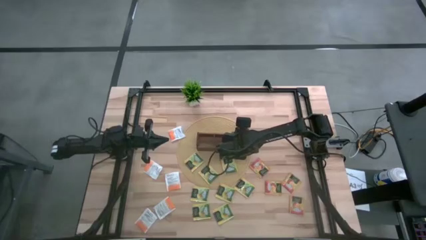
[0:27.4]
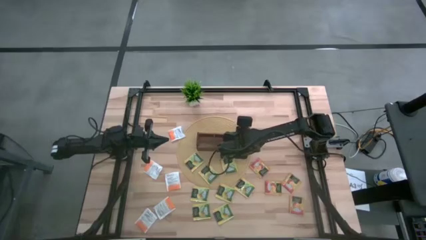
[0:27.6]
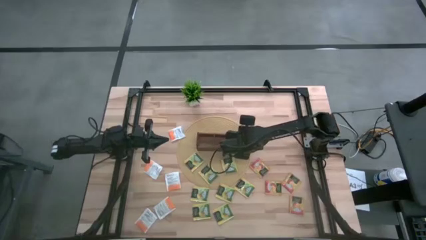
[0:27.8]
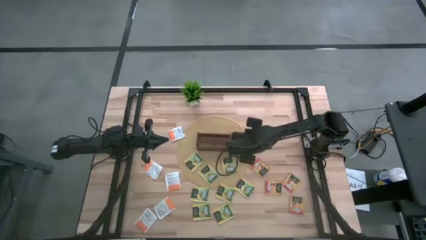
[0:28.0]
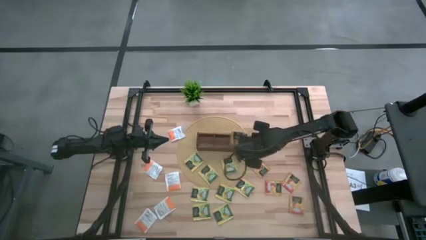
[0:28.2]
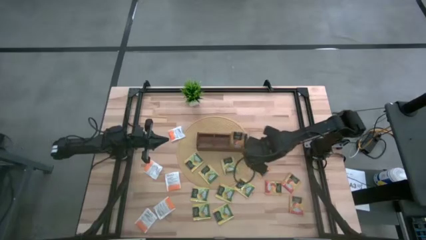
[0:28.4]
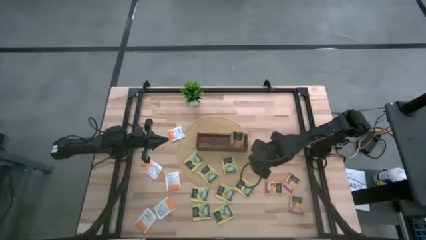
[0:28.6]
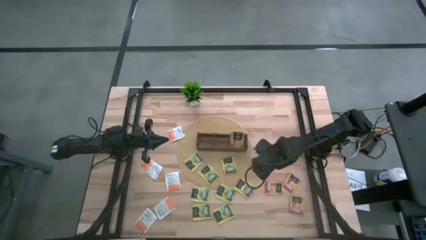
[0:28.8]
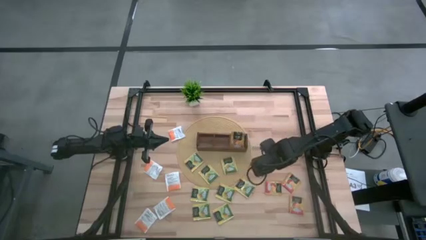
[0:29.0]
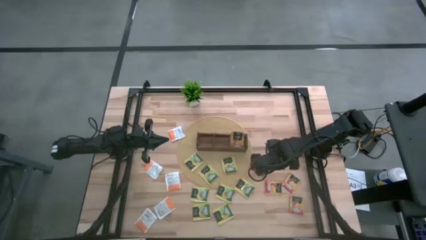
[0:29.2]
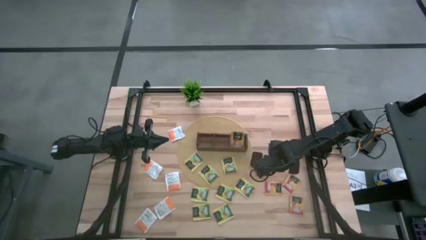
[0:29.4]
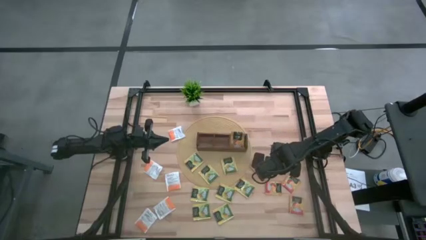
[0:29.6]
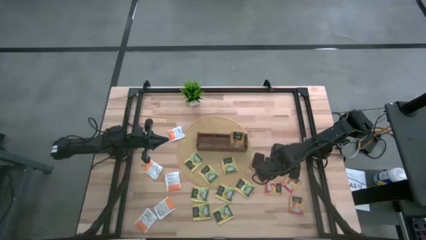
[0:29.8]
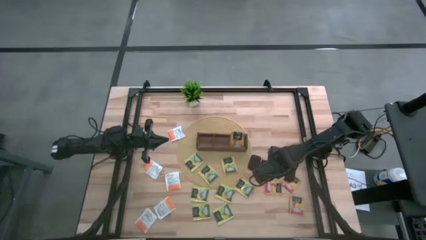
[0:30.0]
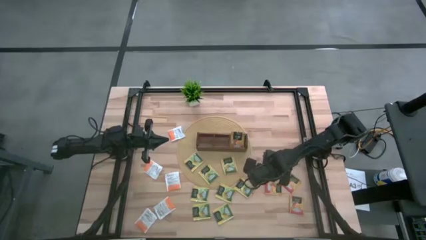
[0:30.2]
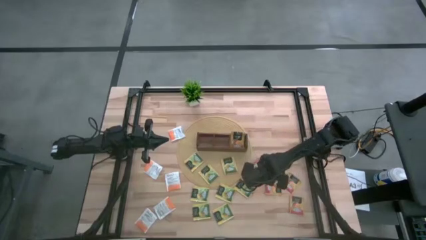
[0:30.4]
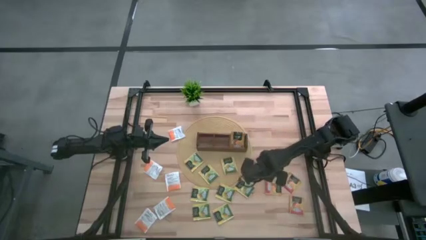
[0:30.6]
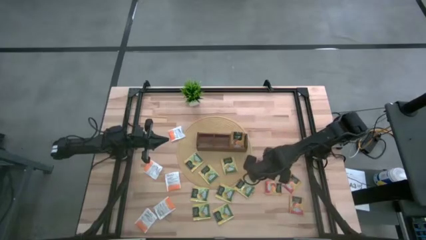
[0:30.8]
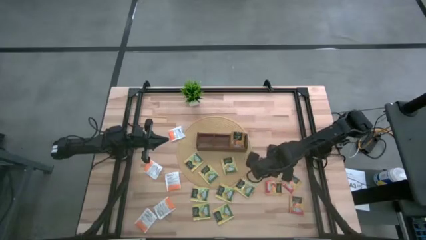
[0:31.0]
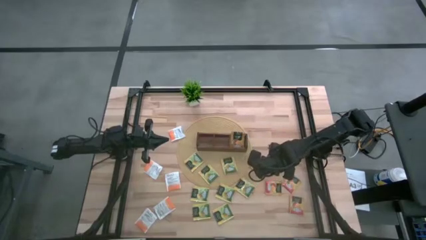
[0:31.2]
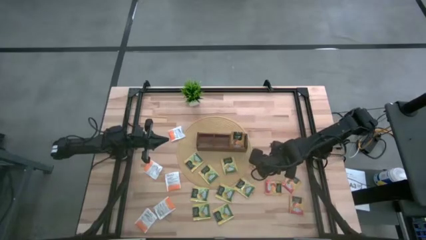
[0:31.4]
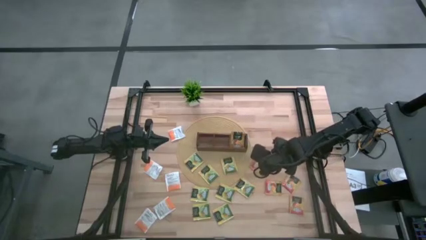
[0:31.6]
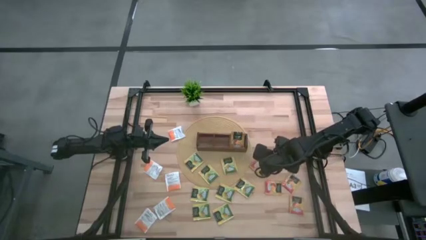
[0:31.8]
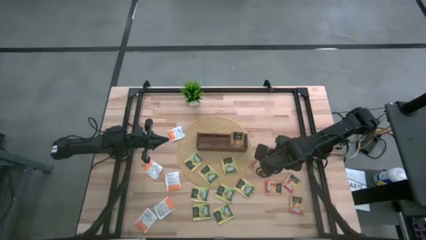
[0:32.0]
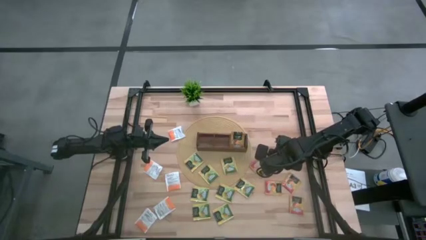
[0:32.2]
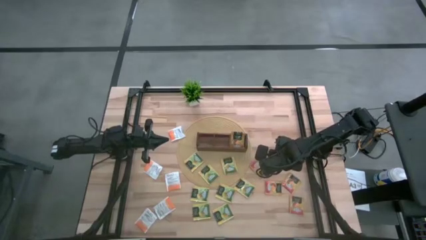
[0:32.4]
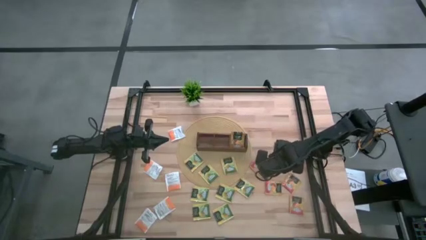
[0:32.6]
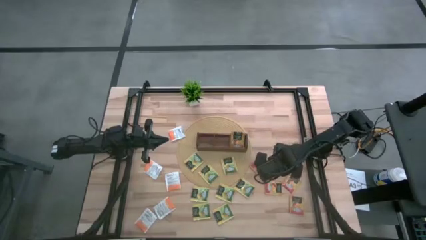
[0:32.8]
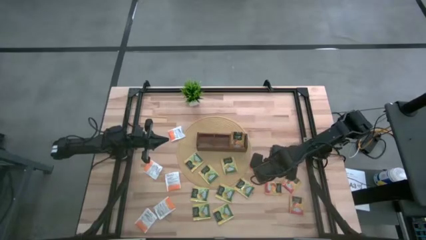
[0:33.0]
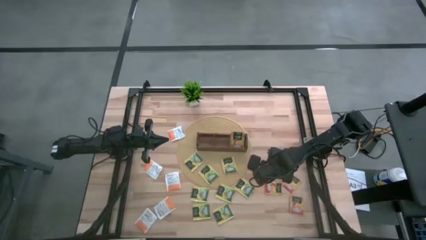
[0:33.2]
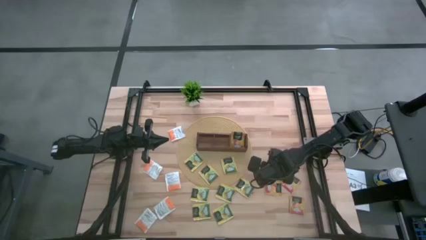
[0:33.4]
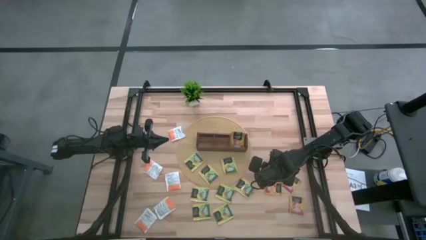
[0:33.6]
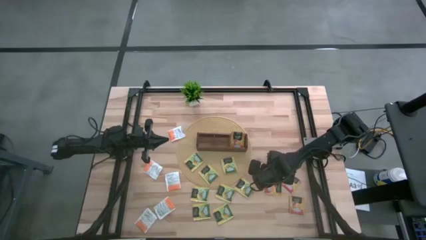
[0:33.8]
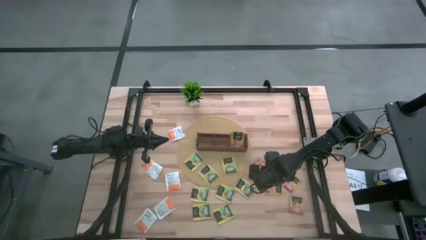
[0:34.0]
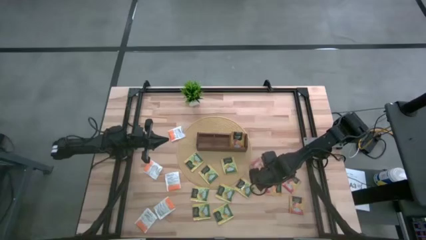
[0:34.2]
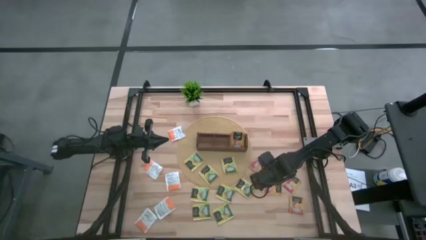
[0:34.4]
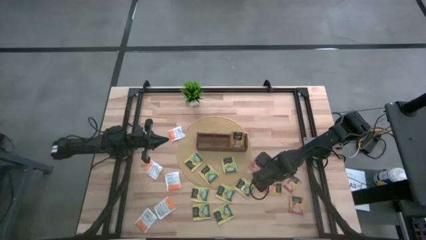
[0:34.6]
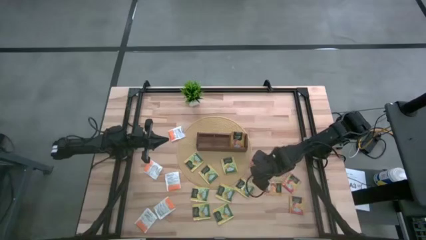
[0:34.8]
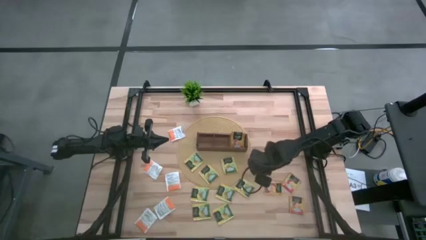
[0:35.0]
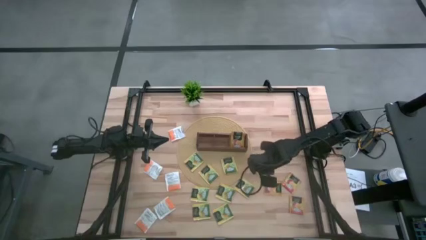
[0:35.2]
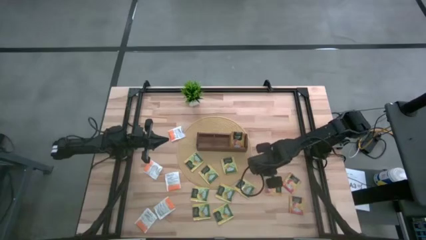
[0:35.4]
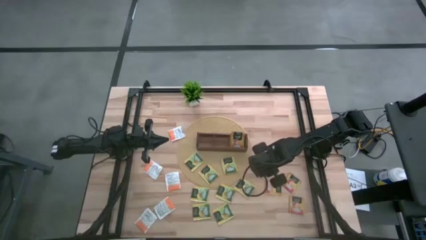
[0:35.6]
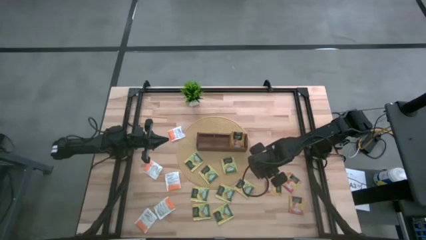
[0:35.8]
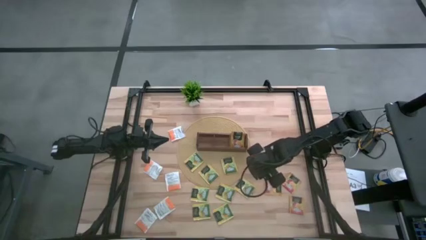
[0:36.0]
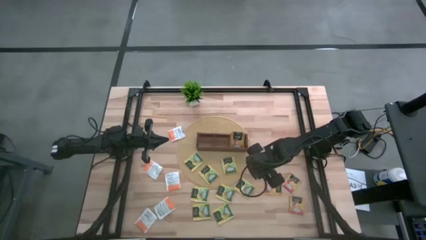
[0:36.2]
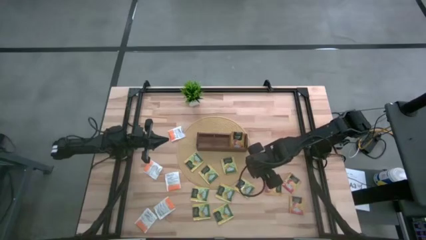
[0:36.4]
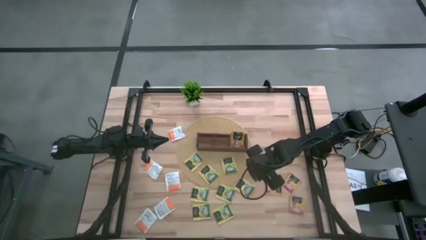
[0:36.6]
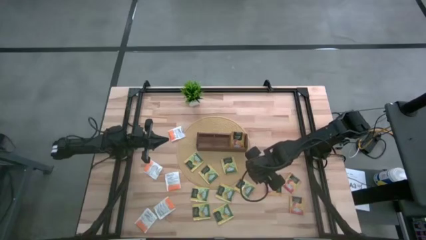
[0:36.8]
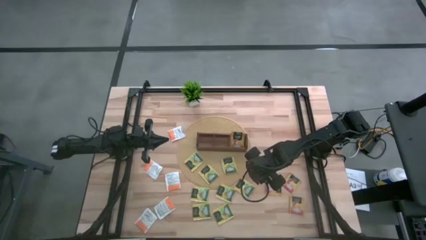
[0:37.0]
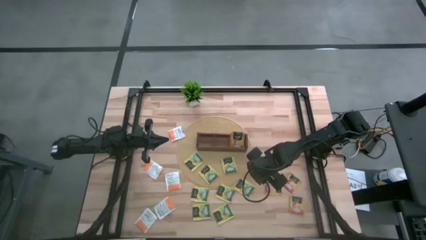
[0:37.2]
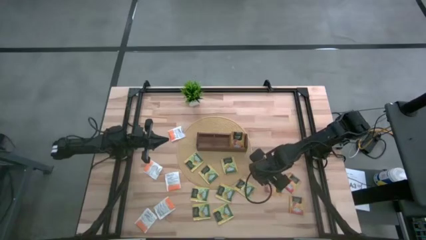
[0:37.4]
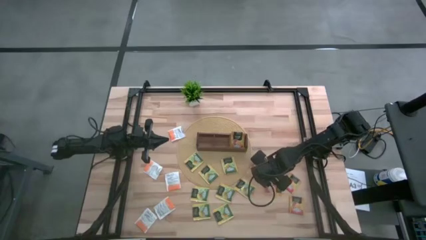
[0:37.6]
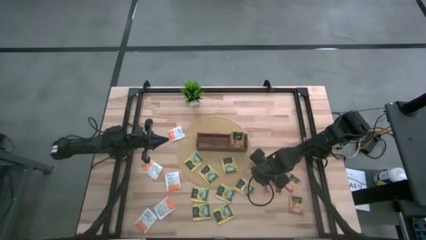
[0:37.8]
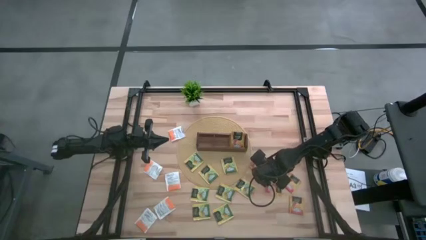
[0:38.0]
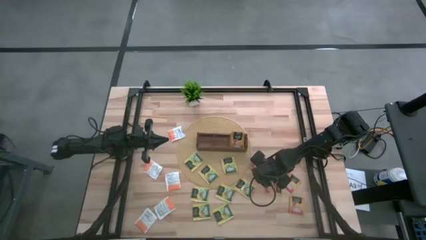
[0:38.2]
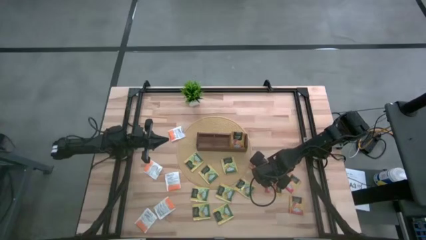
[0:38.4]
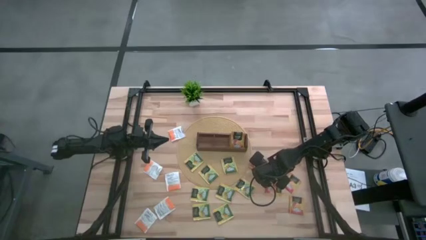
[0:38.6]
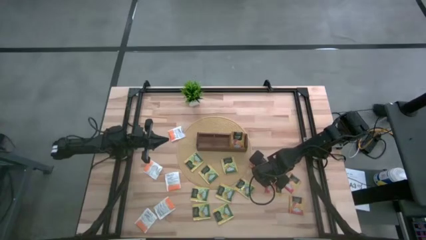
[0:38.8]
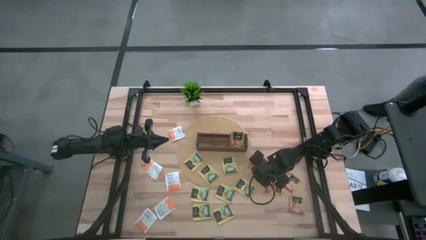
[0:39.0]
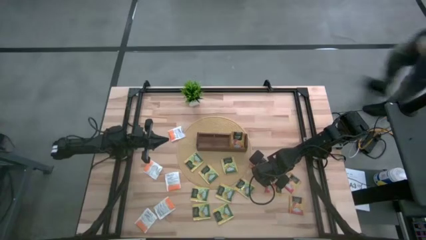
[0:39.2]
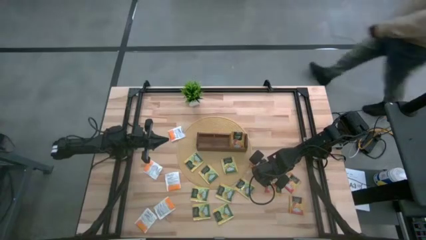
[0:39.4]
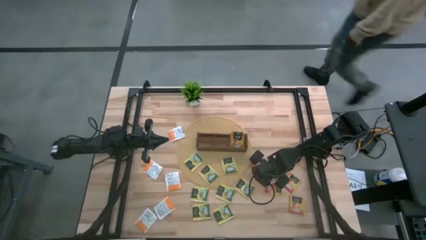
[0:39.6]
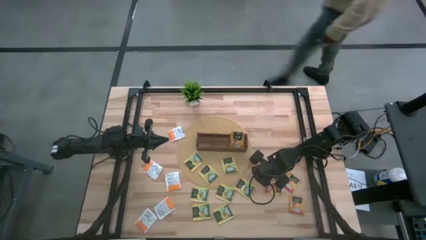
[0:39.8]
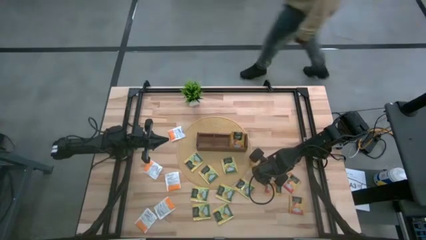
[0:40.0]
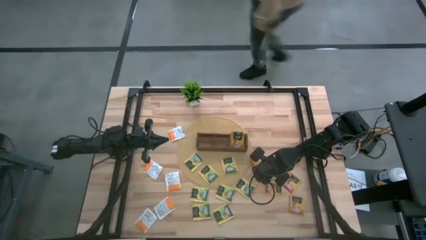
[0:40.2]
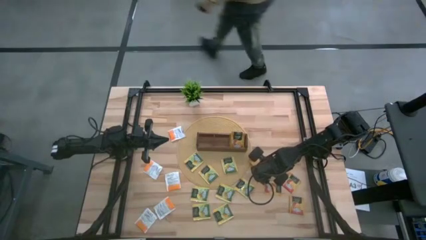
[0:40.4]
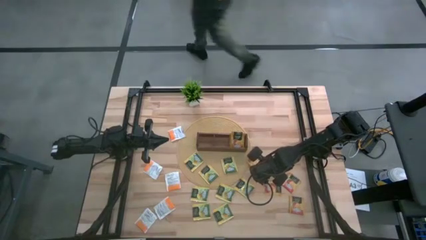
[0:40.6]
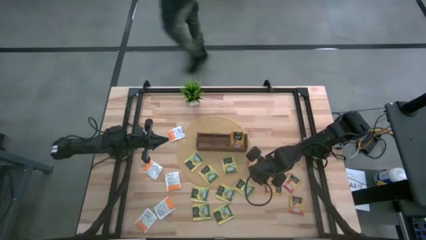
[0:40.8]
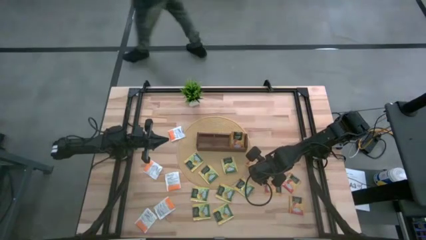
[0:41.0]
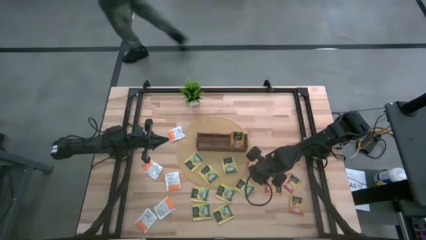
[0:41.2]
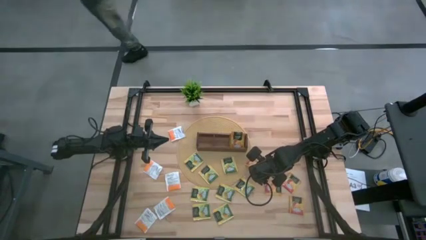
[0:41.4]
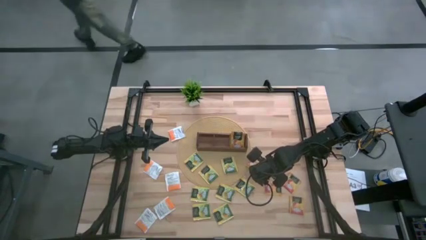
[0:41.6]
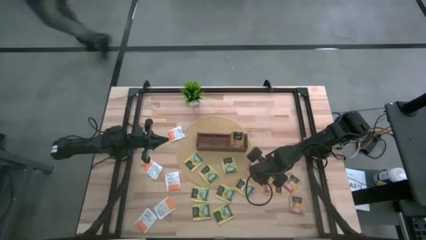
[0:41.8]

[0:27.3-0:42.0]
Task: Pick & Place Tea
Put the orange tea bag into the right section of the wooden organizer
